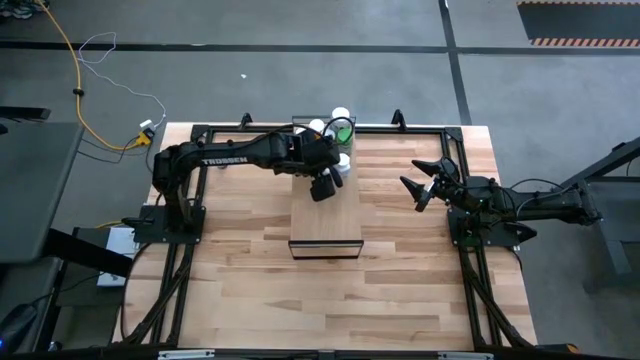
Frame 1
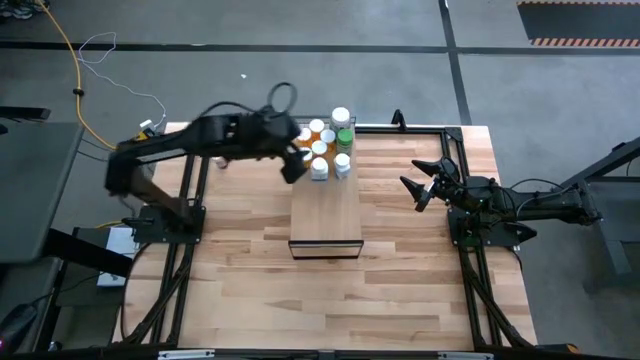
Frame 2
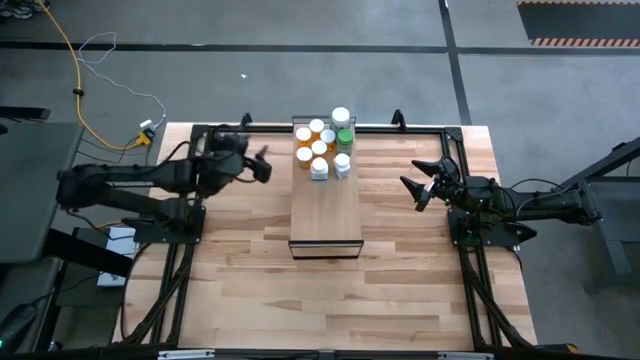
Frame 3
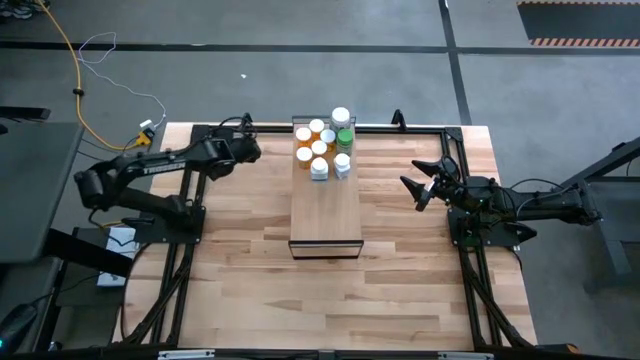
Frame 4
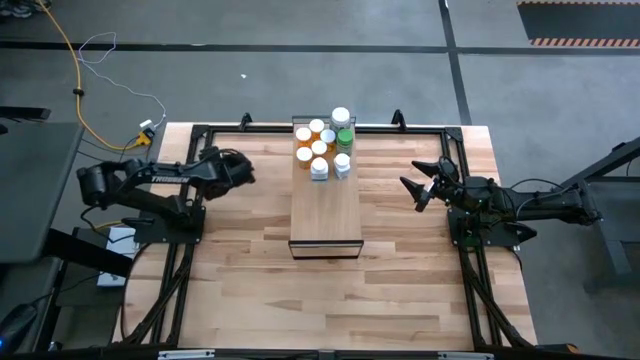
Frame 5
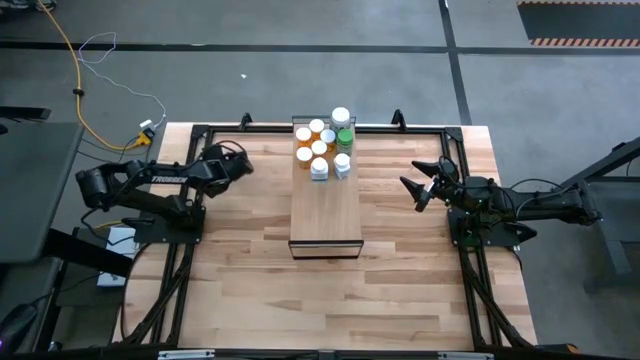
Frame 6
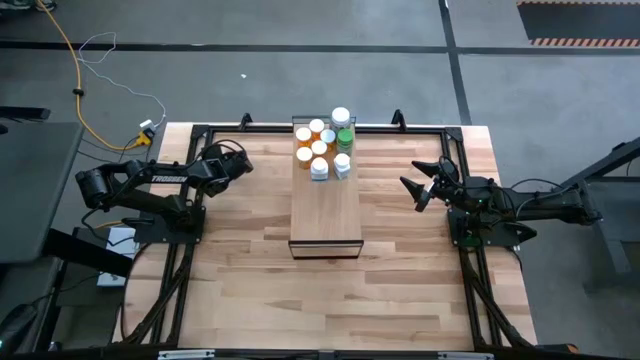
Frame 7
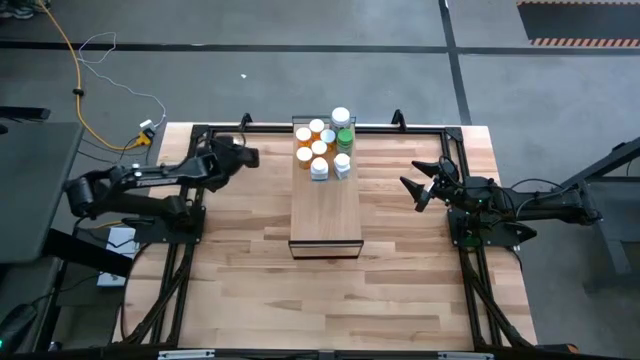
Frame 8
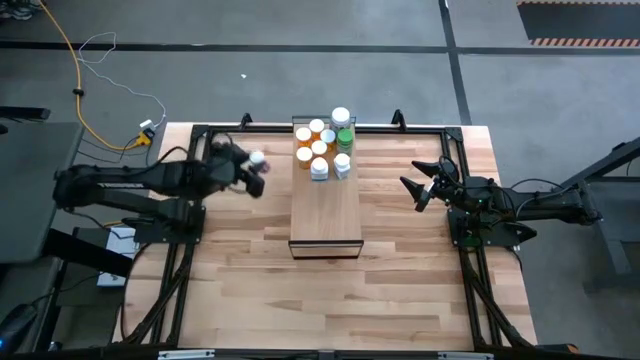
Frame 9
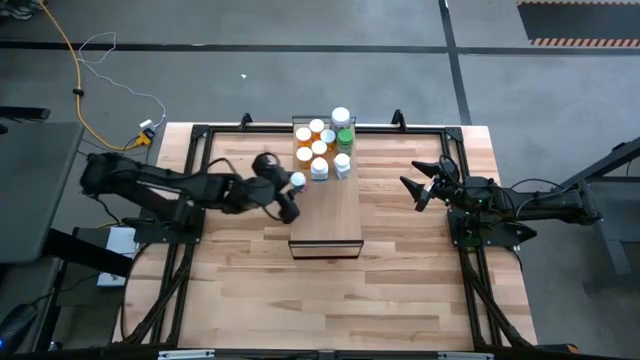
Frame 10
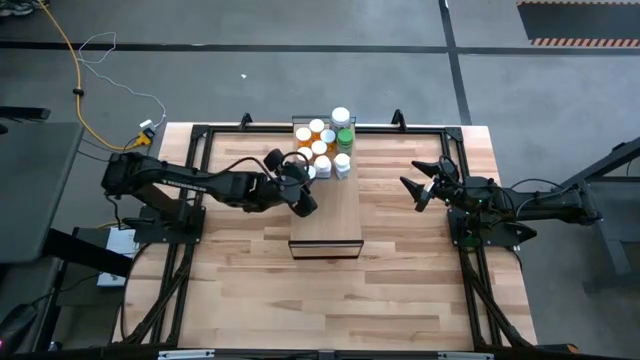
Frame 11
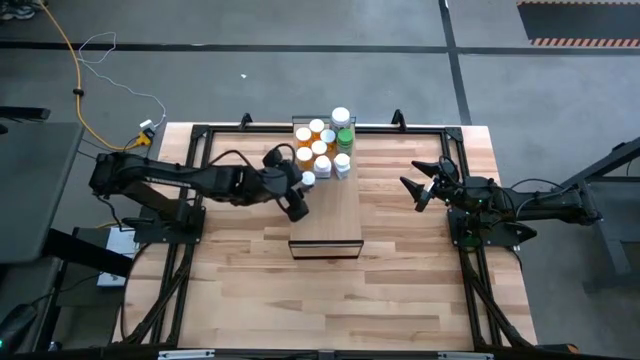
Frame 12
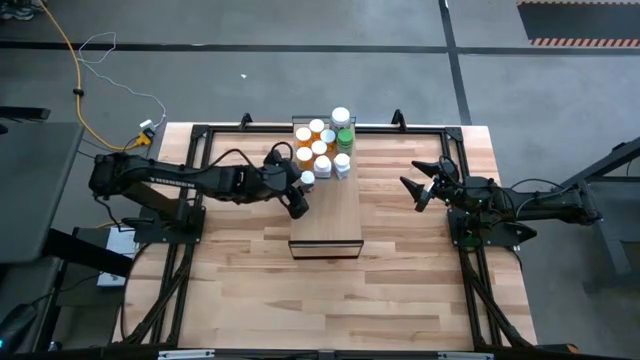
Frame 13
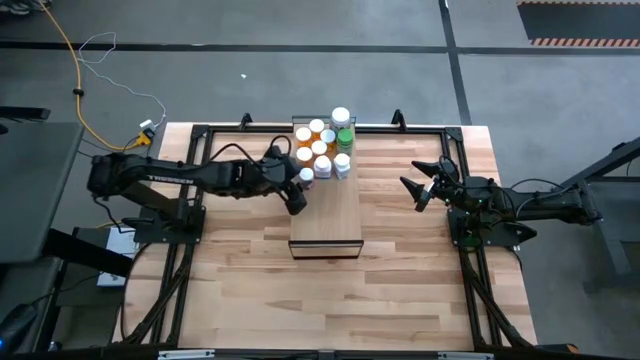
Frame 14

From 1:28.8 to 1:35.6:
Task: Pick and place medicine bottles onto shelf by color
Put the white pill bottle on the shelf

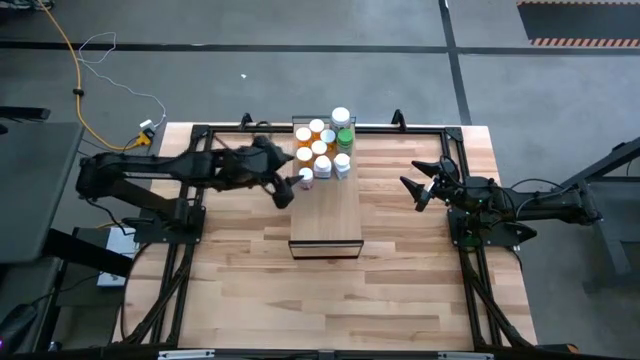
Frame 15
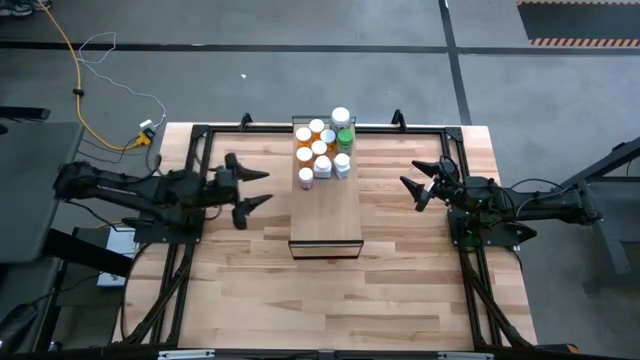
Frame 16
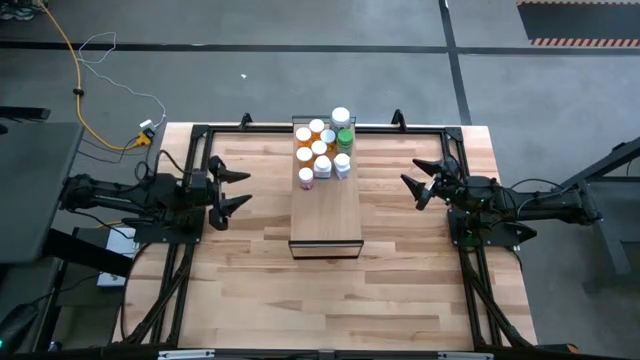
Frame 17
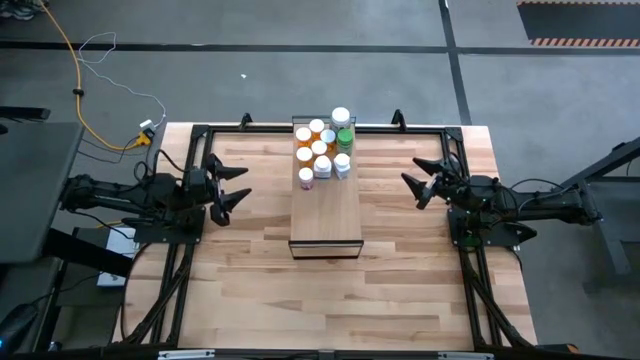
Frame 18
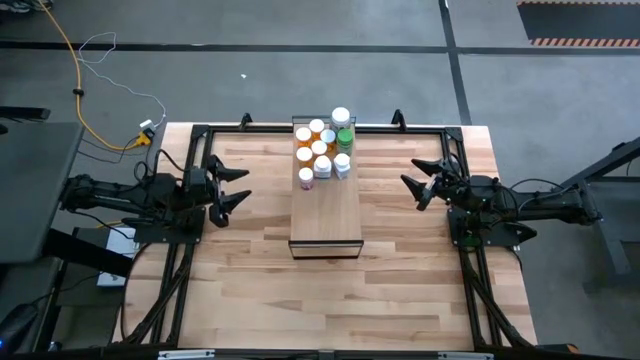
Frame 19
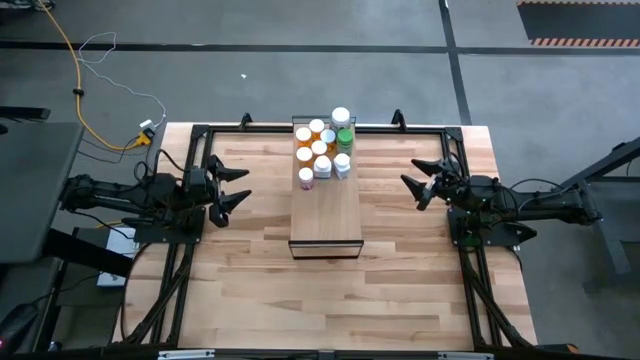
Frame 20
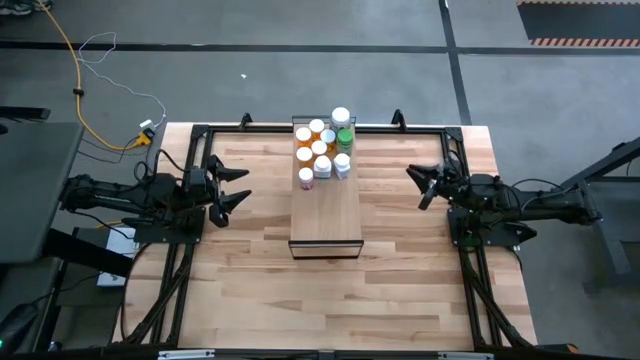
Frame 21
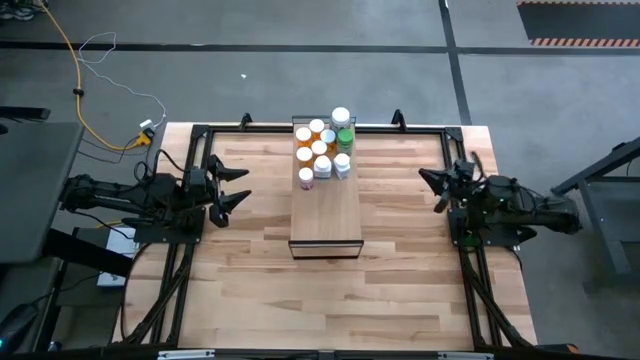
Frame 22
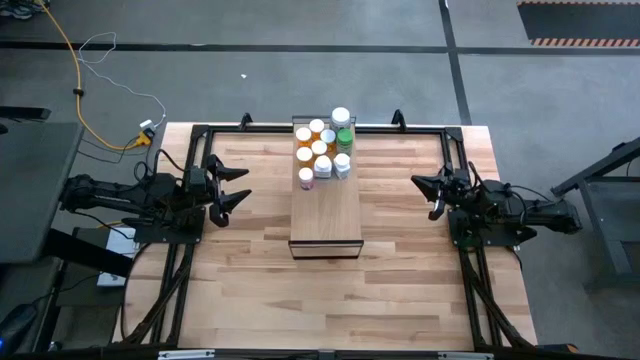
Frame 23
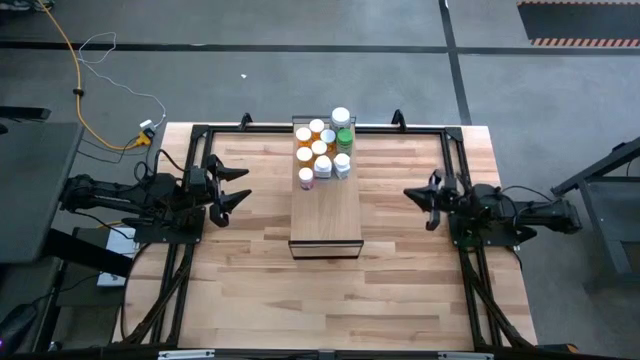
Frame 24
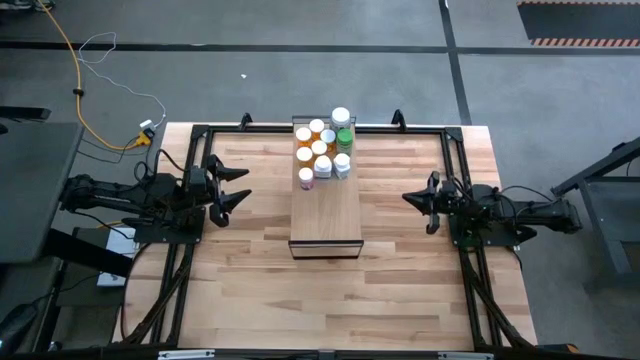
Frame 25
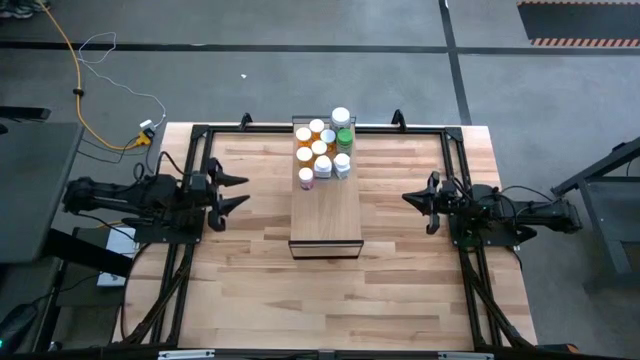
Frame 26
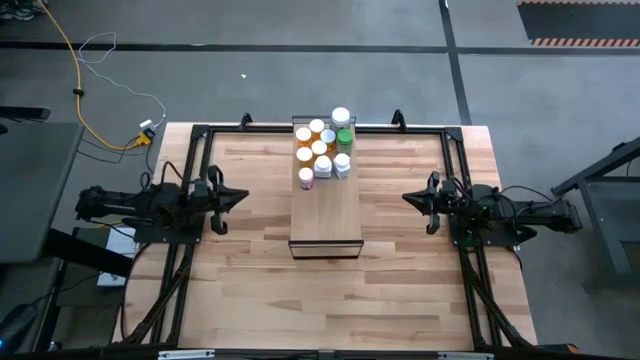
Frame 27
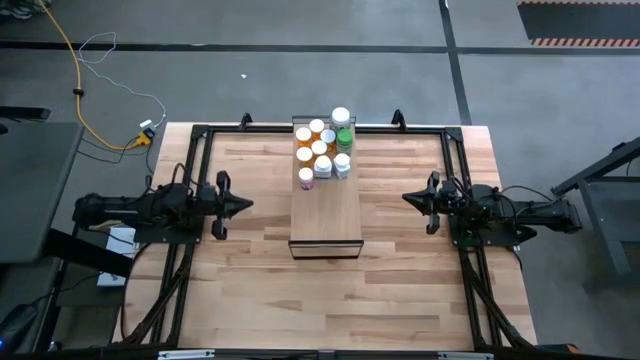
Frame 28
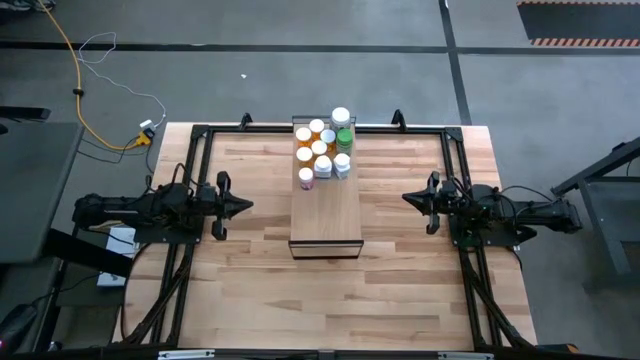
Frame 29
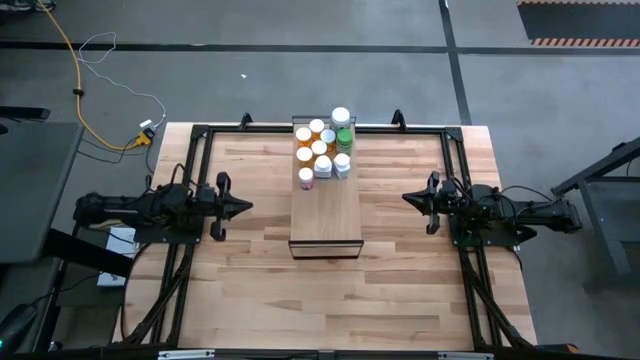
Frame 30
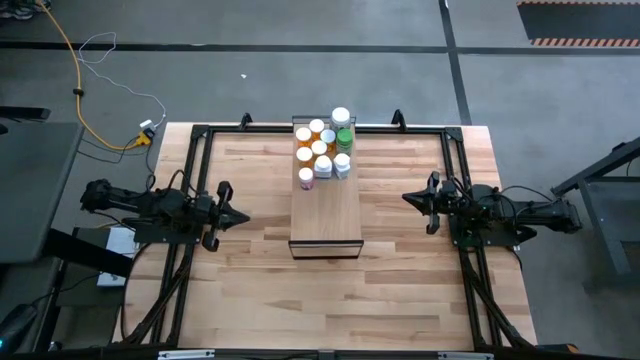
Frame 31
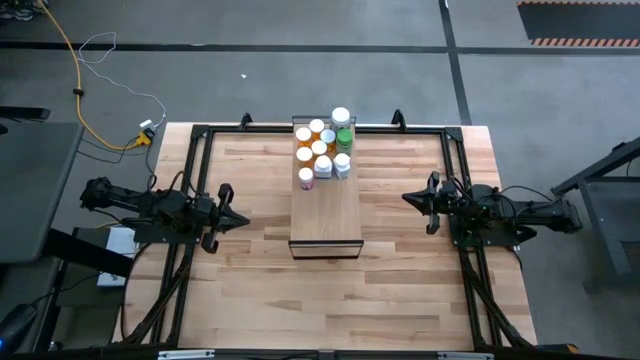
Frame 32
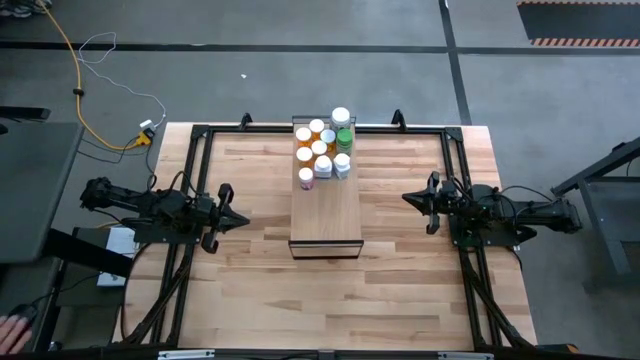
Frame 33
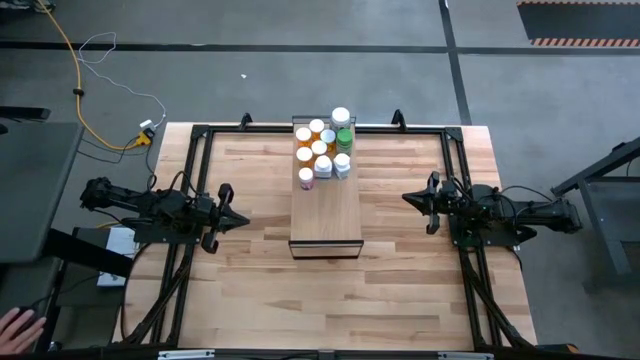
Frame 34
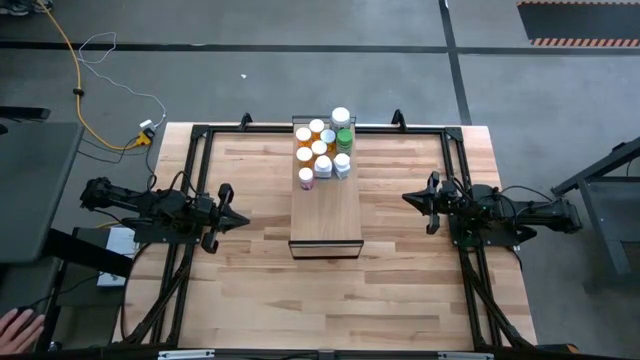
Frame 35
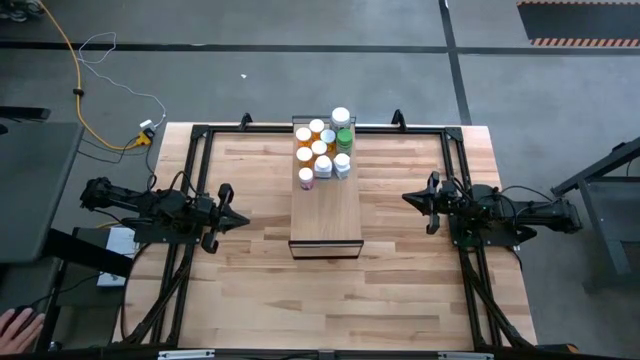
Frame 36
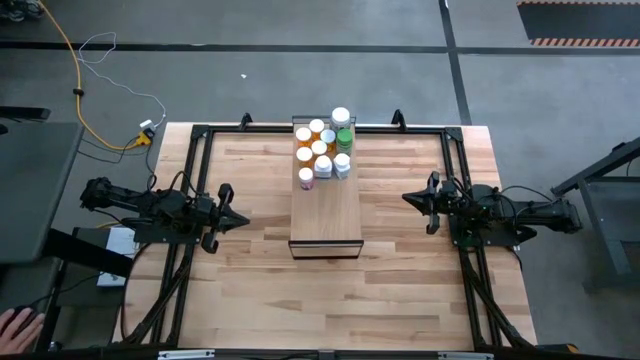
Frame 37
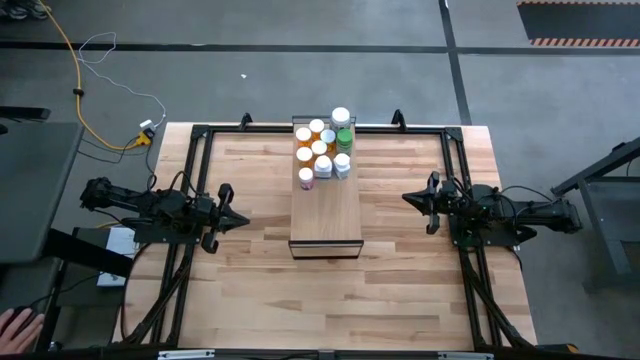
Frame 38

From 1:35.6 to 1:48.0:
Return to Home Position

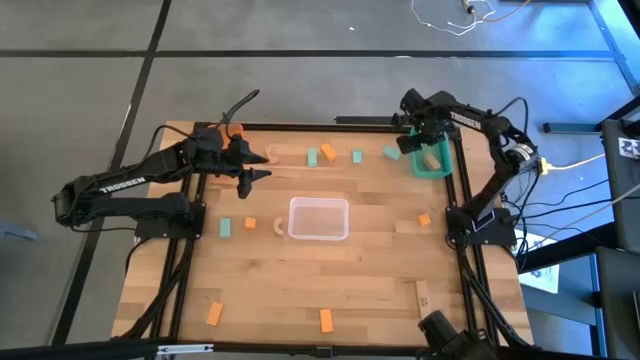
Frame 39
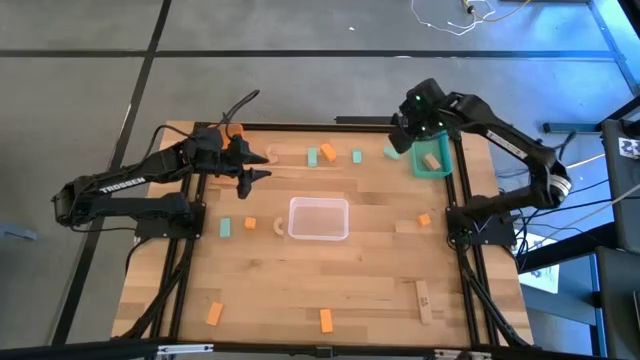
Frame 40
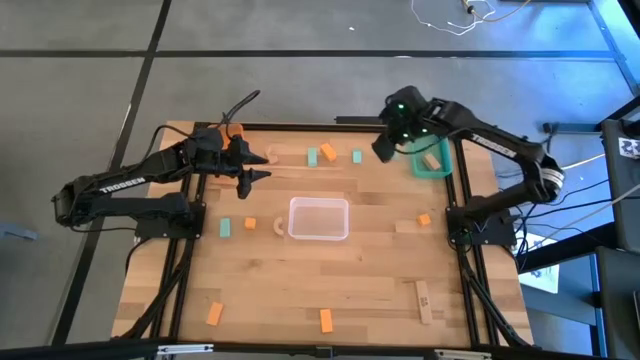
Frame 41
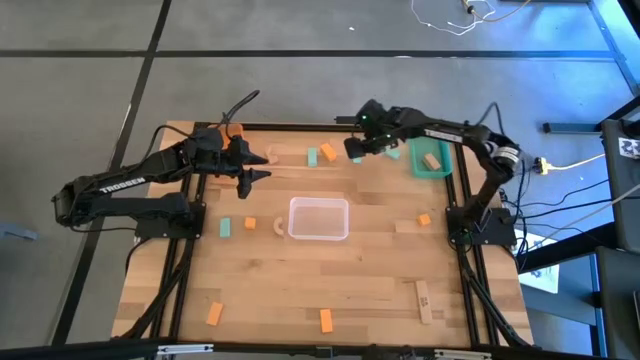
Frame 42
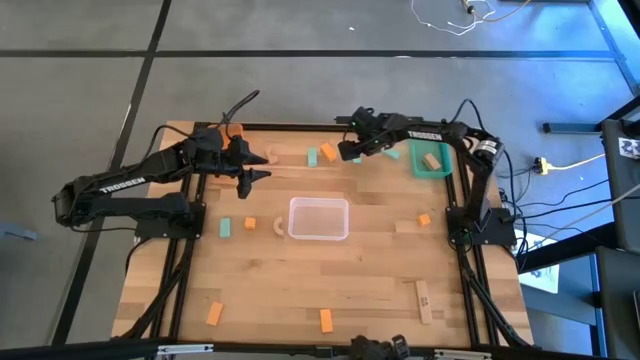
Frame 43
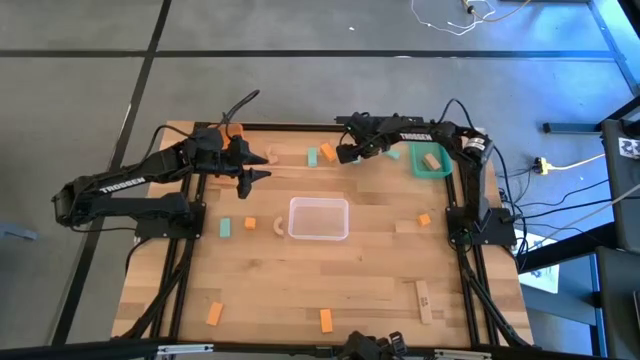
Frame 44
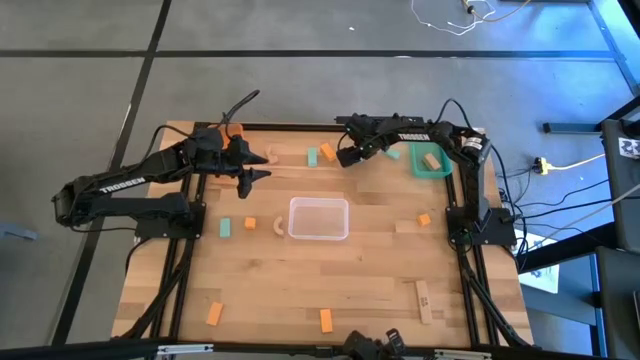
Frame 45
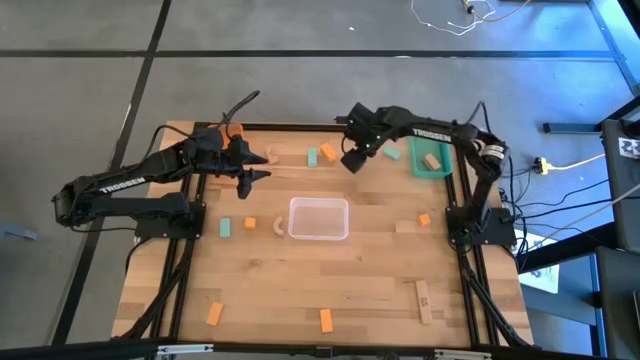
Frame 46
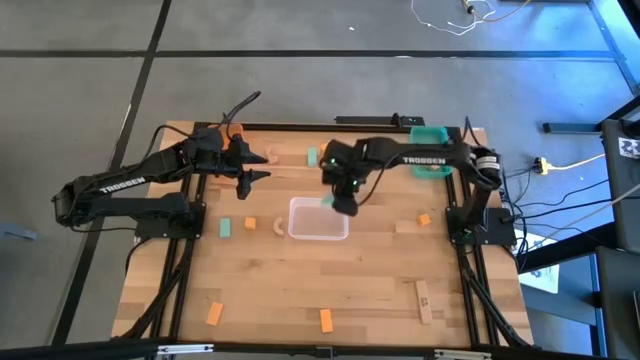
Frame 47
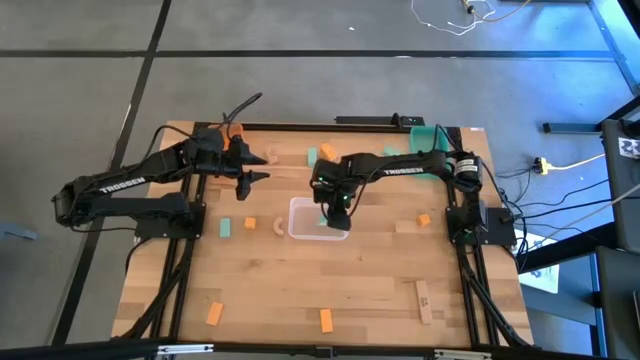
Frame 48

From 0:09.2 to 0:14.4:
Task: Sort & place blocks by color
Put the blue block into the transparent bin
